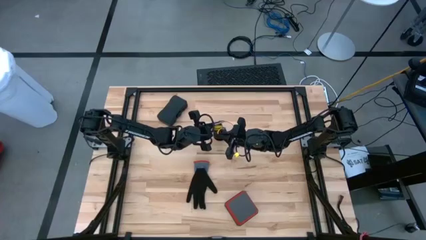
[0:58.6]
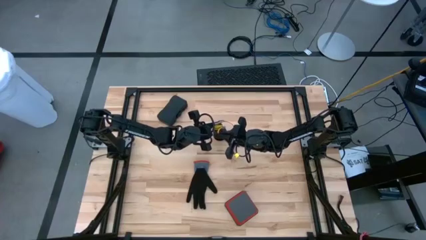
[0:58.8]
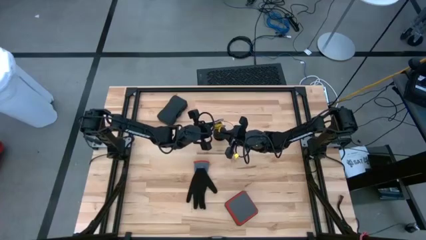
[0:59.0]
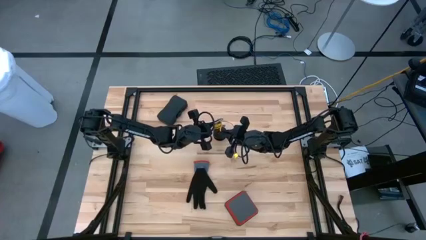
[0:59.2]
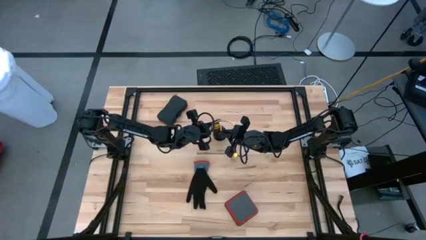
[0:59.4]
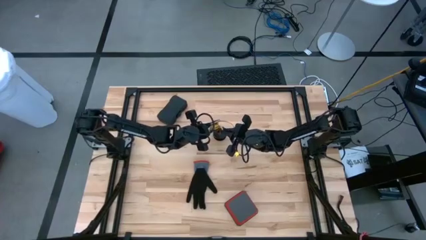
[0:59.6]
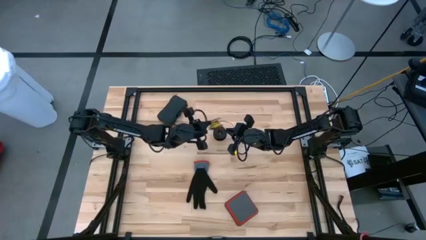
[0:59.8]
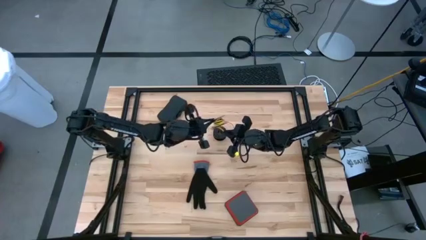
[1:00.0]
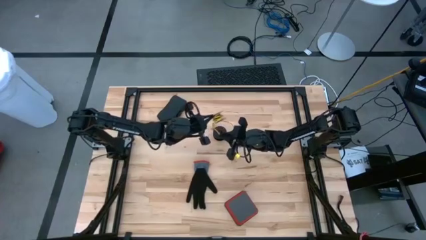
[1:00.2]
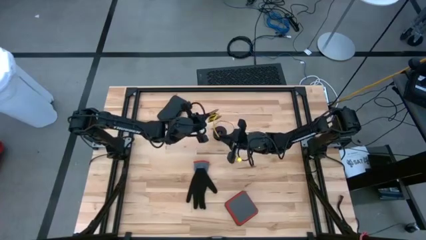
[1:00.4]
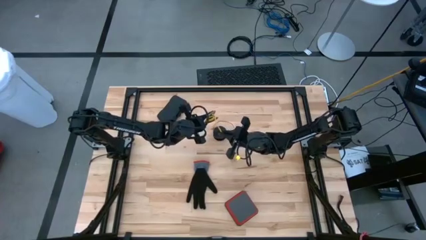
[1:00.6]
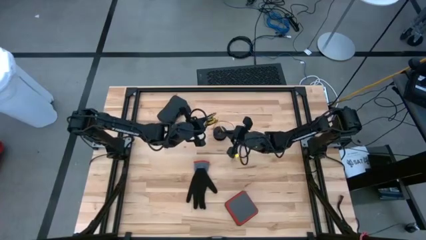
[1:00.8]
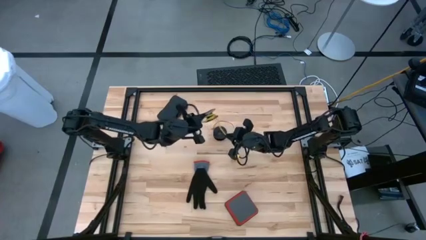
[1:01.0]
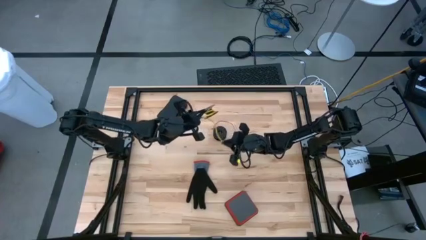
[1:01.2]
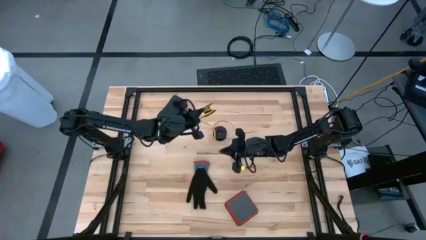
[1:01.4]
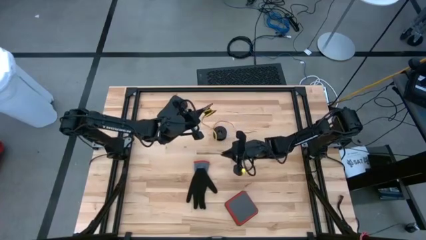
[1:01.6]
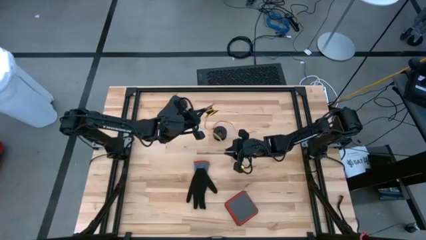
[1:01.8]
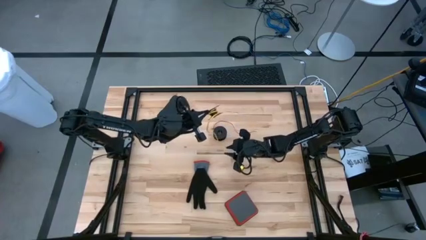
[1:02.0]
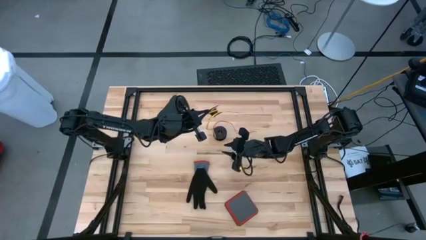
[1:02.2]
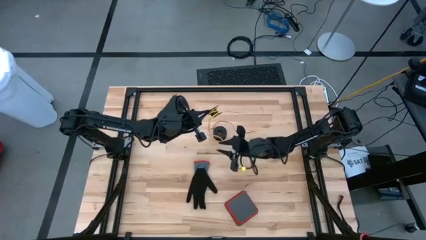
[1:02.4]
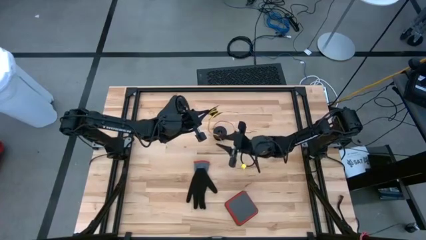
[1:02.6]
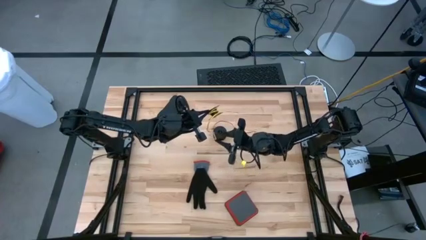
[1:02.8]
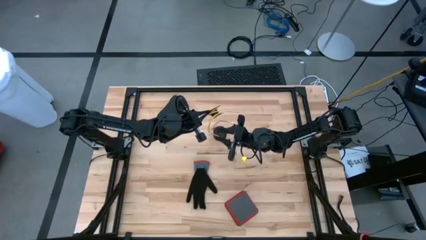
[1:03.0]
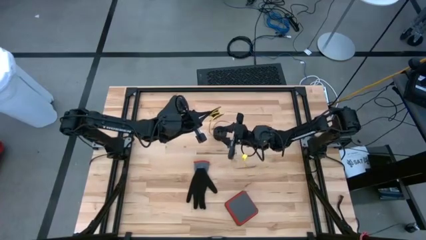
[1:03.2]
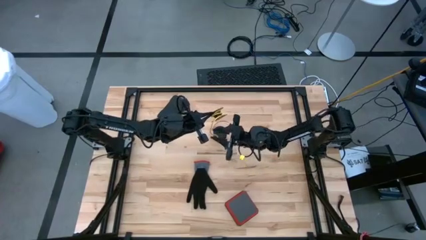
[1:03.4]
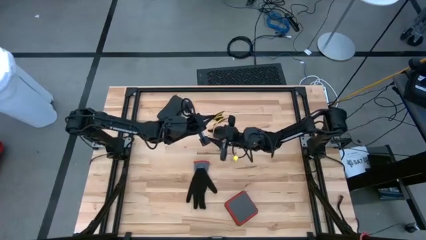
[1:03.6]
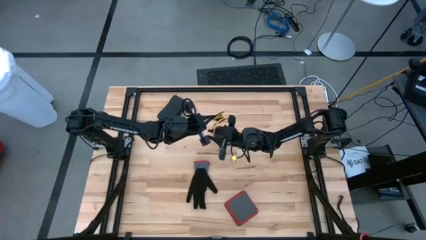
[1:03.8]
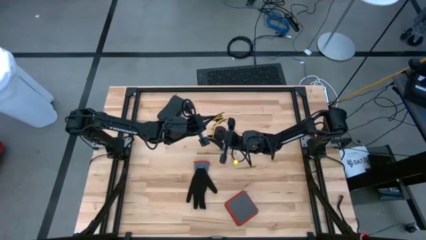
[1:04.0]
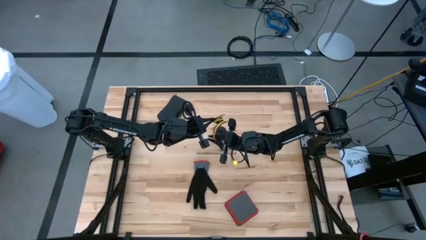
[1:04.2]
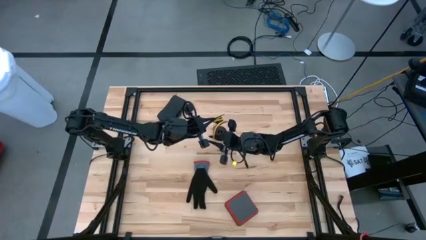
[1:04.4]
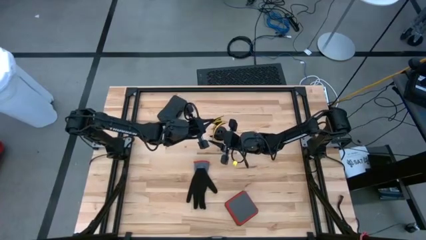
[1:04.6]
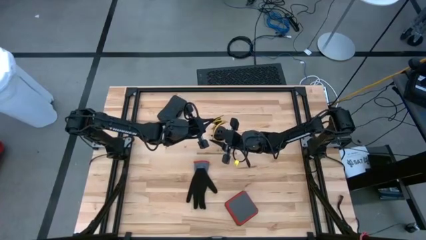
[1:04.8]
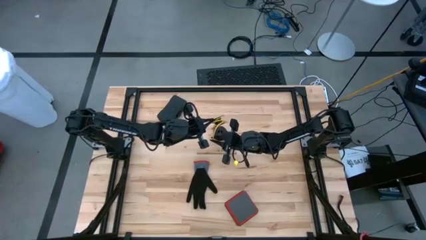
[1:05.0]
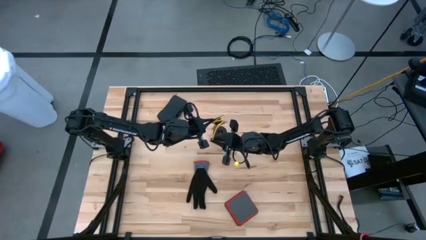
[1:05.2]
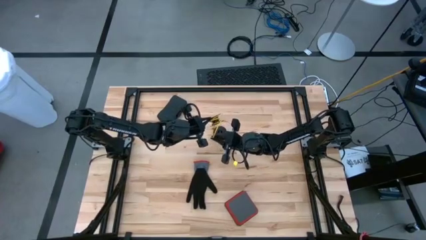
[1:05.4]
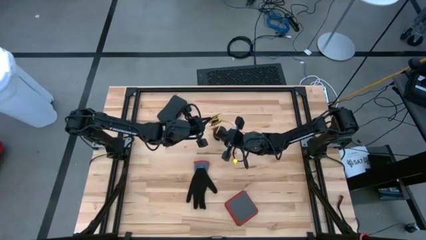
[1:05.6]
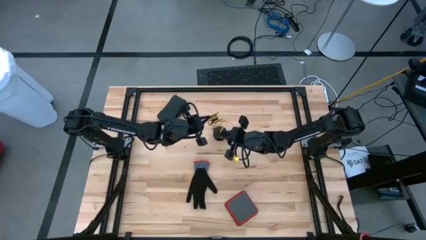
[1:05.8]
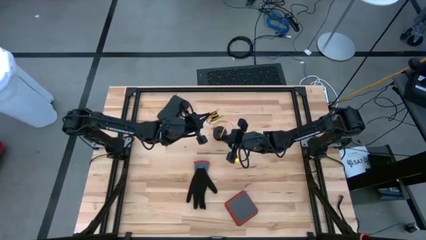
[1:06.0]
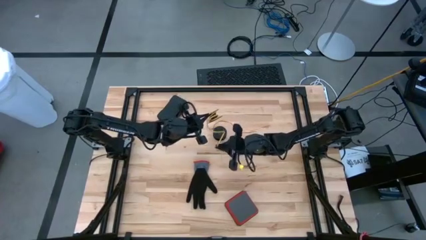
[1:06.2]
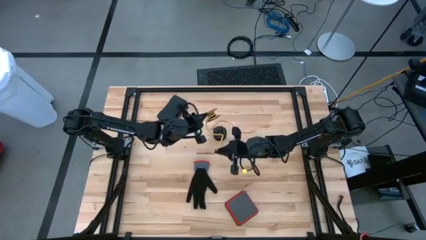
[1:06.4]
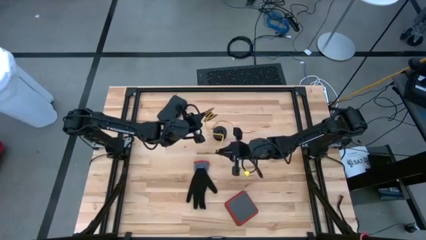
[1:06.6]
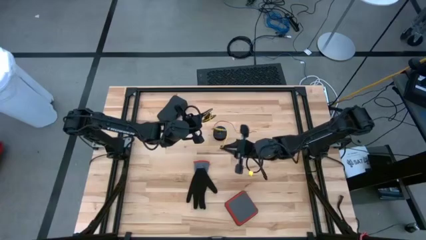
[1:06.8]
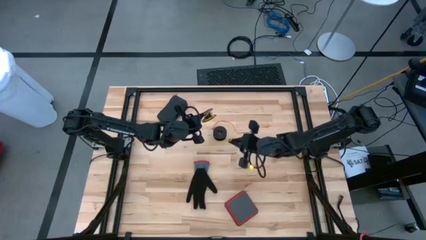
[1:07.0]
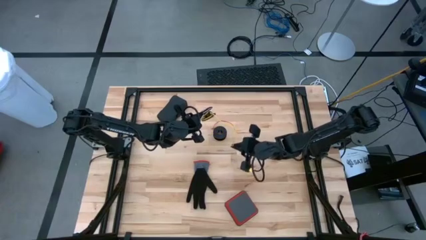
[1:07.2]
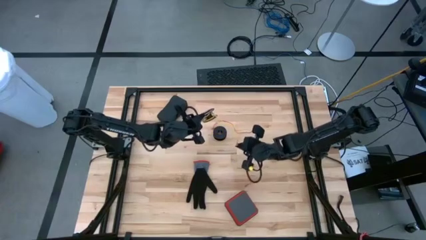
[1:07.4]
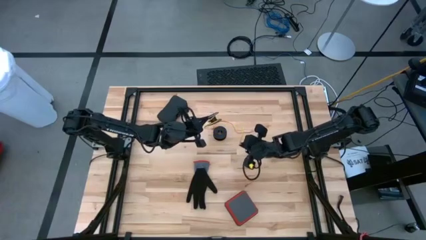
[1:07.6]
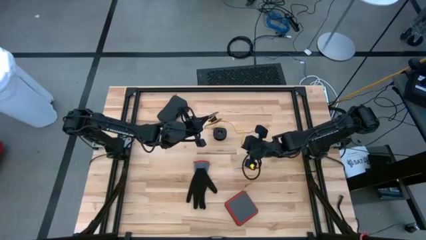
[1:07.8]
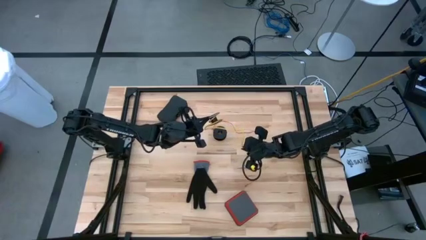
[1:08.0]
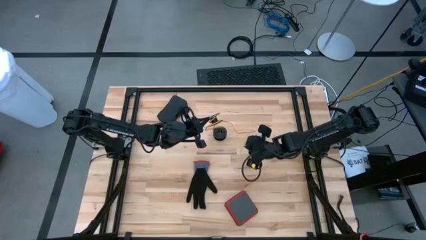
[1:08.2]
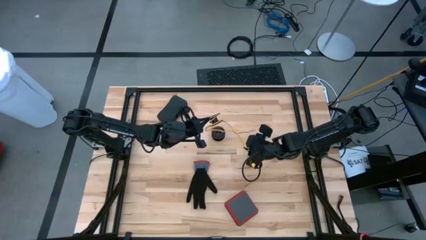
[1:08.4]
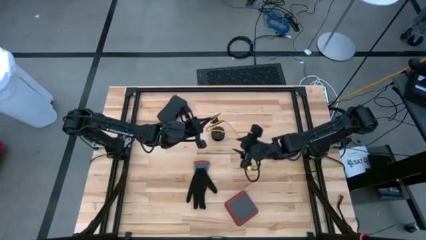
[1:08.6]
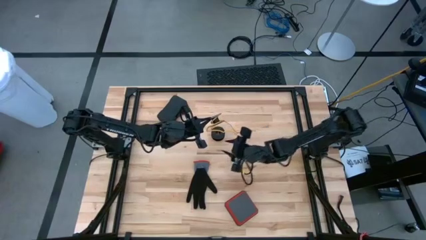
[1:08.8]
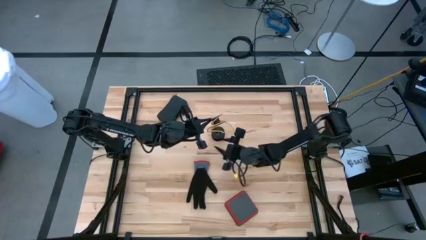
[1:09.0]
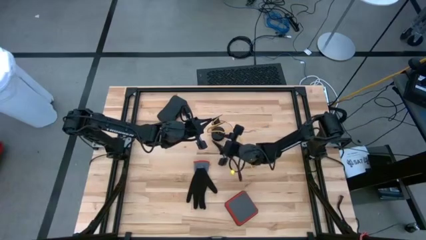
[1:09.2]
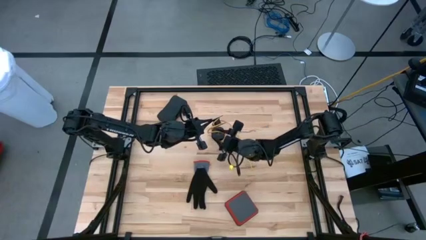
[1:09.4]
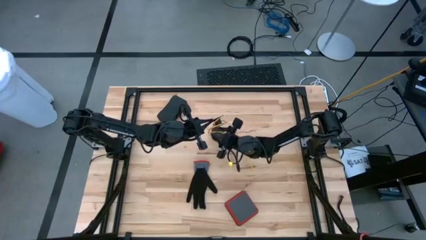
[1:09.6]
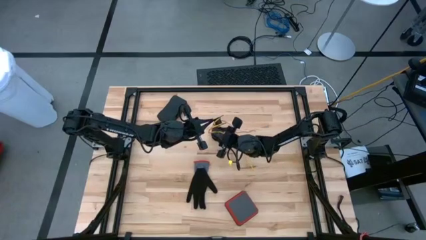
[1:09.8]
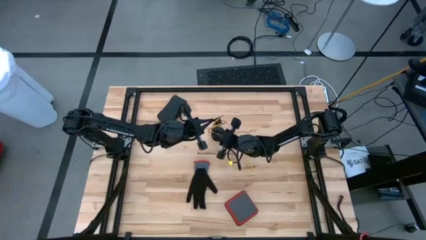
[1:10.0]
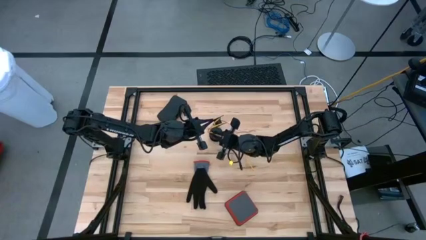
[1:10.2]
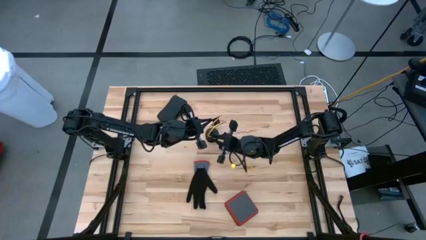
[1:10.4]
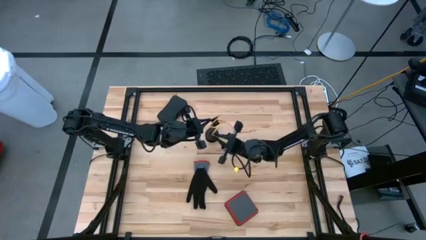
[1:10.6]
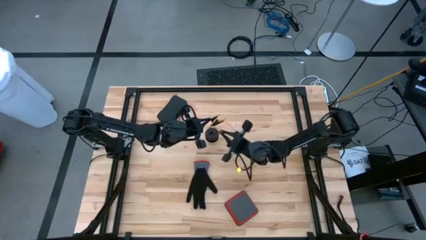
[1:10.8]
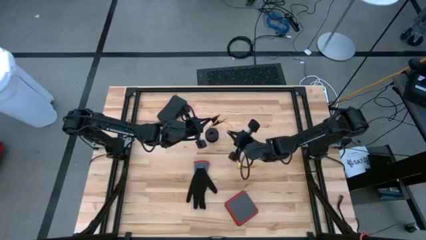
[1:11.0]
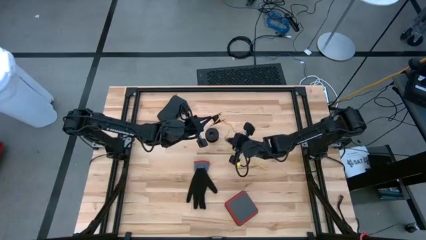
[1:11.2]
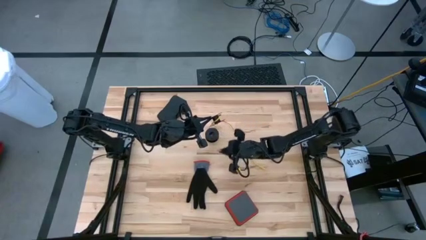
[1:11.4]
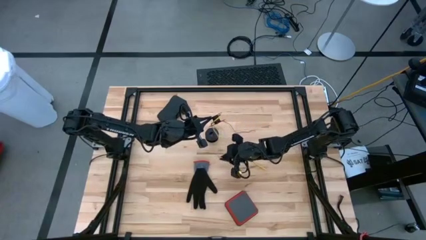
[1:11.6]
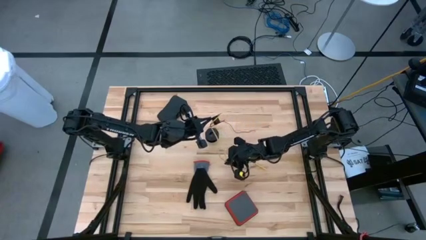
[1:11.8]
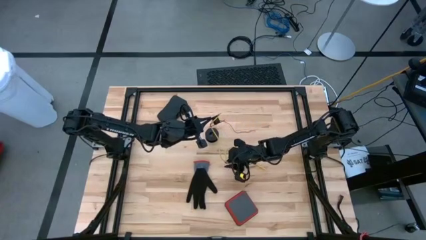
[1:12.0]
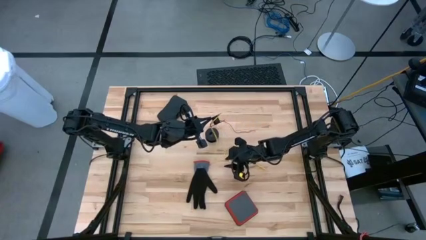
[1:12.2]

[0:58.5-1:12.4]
Task: Coil cords
Uncoil the yellow wire from the black spool

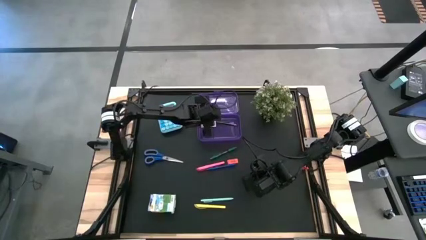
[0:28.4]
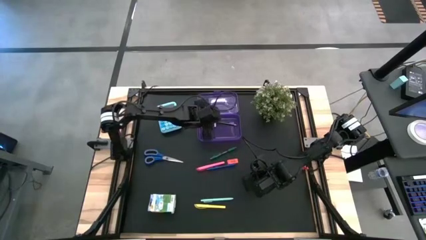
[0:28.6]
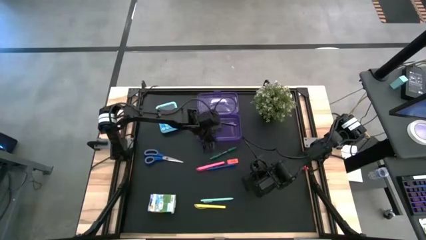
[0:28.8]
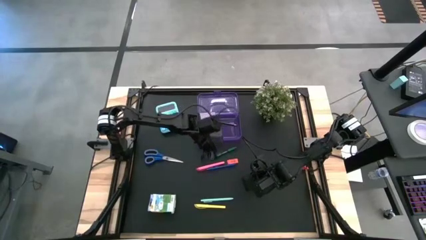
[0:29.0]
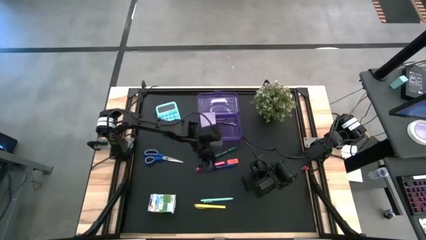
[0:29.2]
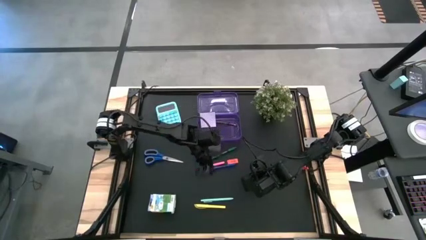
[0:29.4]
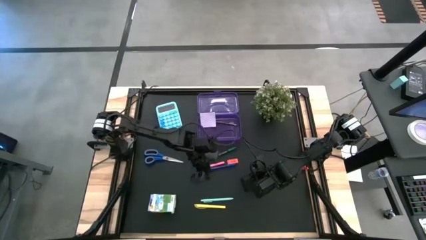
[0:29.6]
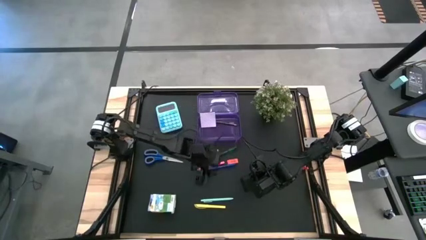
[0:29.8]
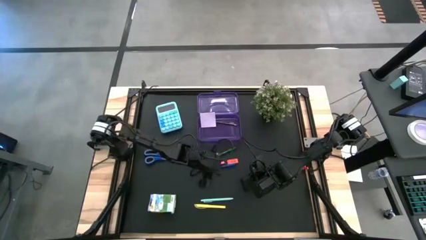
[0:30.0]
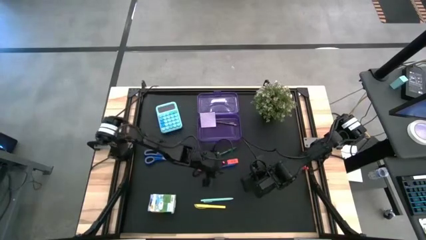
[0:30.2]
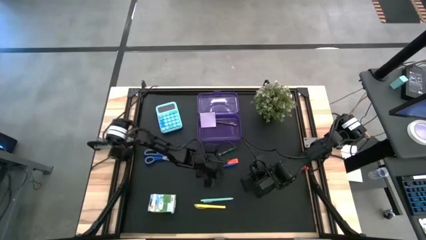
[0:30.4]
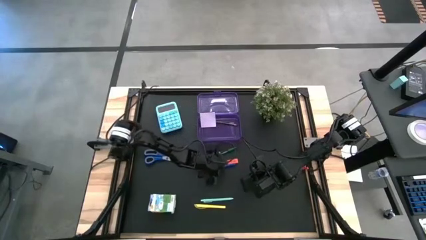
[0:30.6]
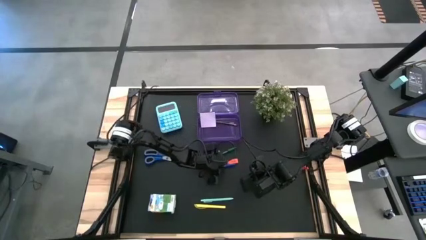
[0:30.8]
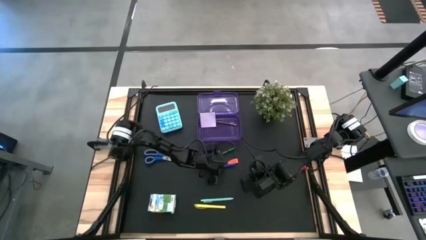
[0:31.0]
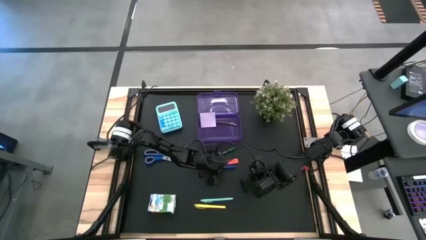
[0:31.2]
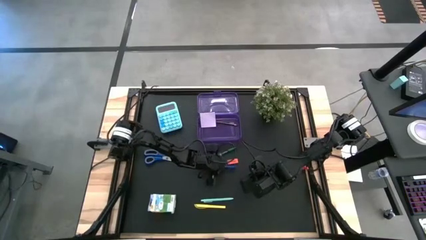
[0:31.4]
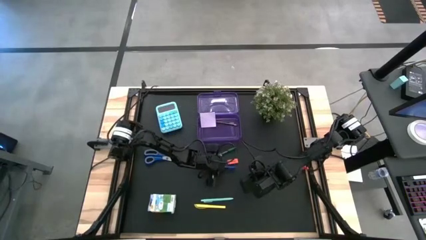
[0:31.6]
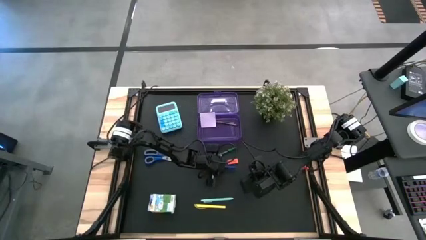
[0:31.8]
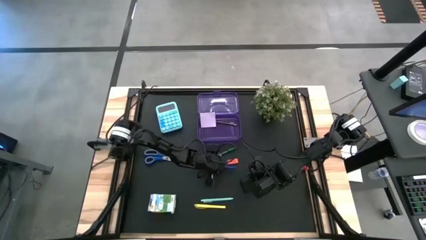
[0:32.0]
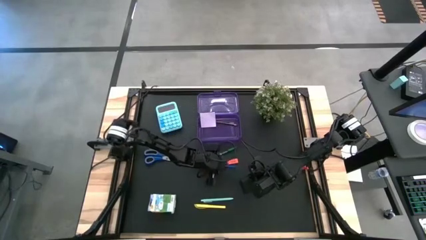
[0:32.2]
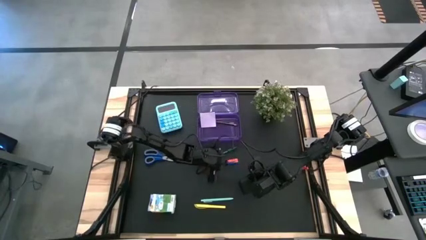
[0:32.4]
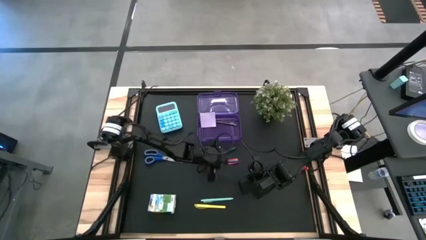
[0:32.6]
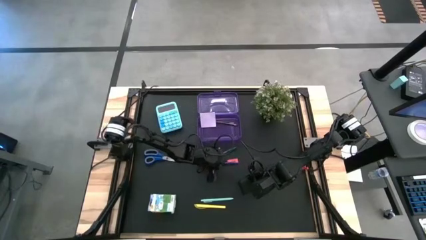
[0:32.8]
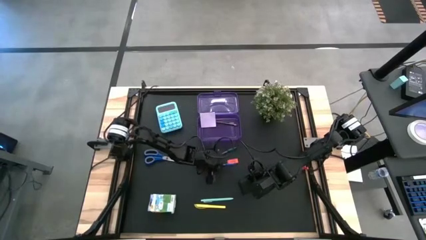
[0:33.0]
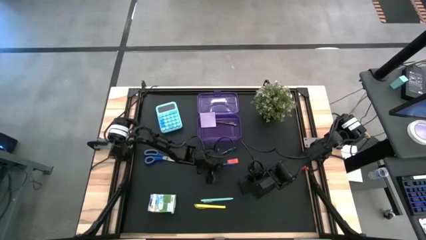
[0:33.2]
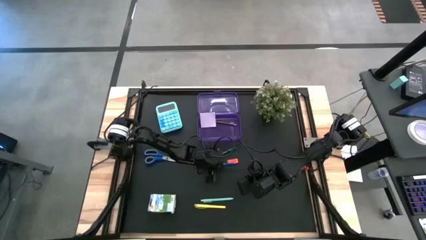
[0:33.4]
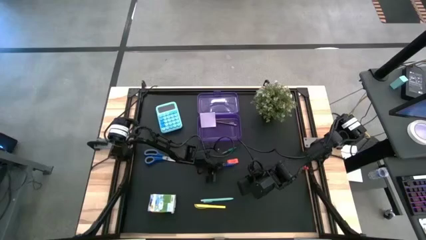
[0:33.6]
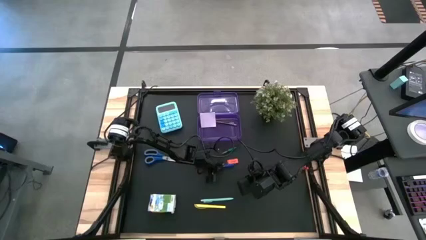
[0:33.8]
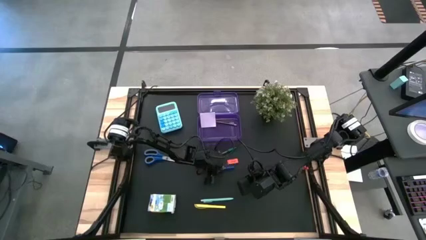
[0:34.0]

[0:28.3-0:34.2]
Task: Pack school essentials
Put the blue pen into the purple supply box
